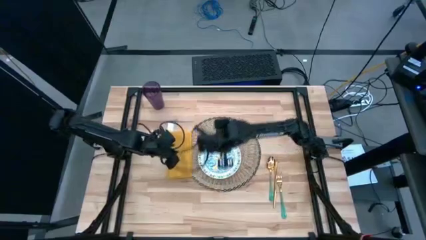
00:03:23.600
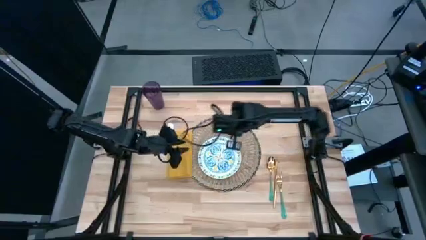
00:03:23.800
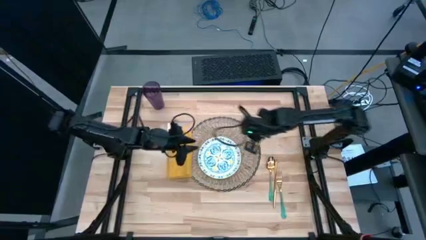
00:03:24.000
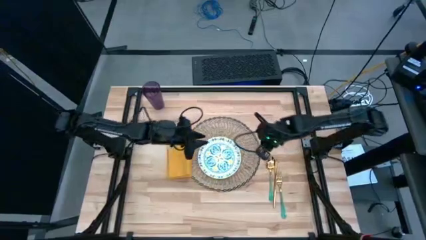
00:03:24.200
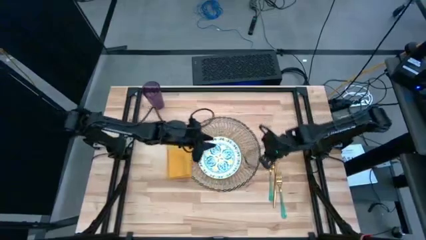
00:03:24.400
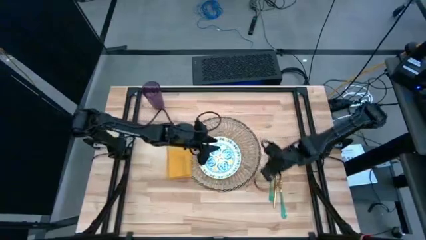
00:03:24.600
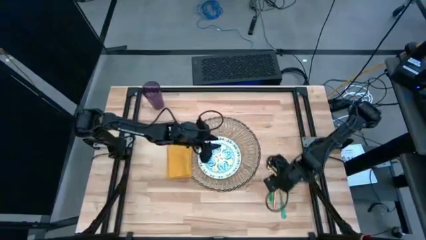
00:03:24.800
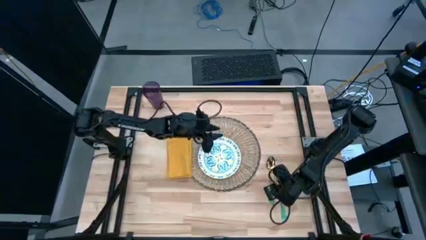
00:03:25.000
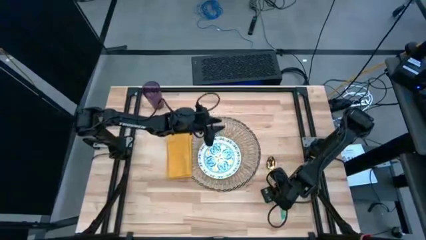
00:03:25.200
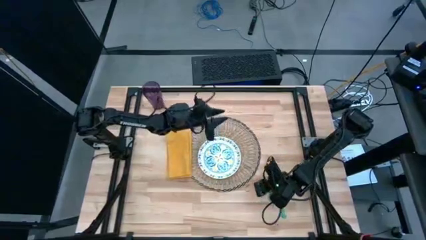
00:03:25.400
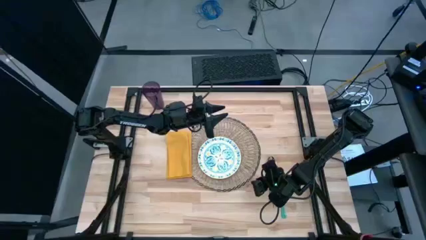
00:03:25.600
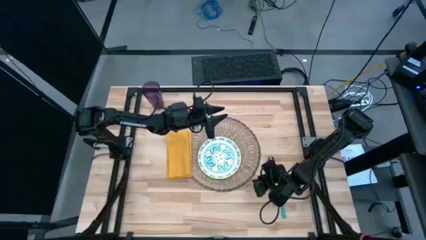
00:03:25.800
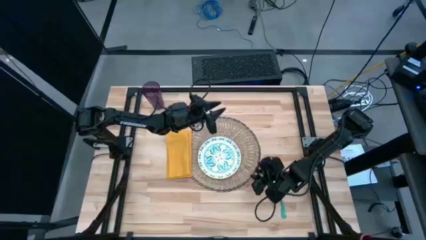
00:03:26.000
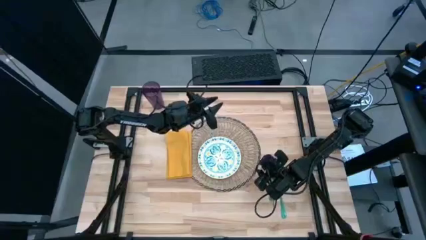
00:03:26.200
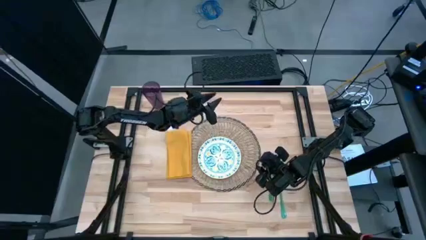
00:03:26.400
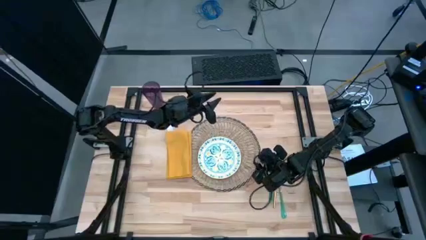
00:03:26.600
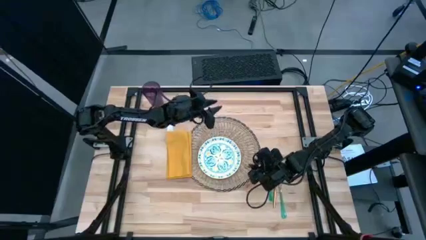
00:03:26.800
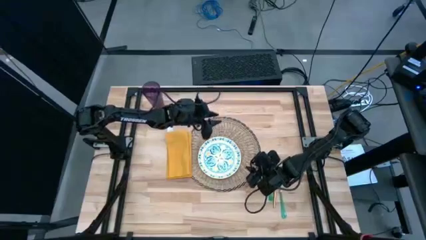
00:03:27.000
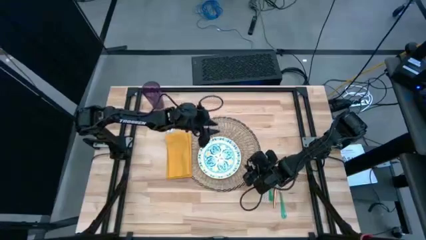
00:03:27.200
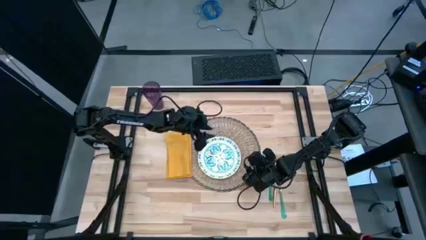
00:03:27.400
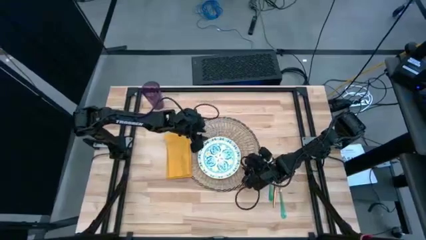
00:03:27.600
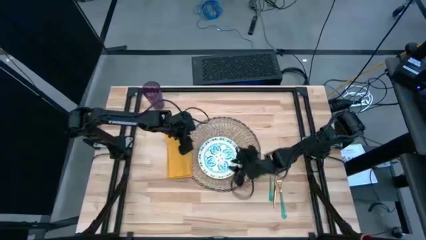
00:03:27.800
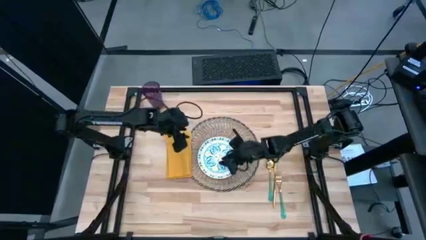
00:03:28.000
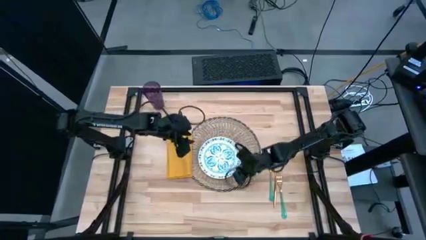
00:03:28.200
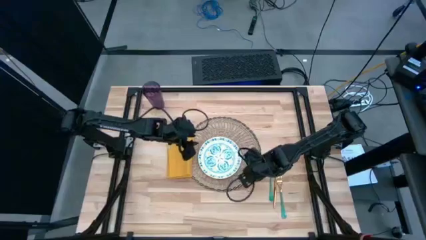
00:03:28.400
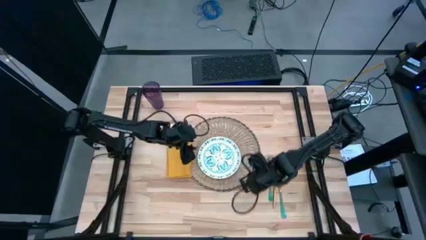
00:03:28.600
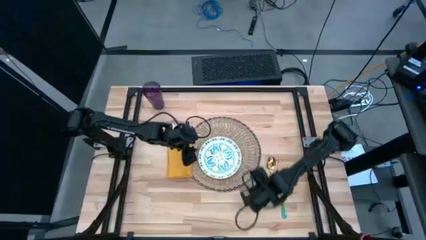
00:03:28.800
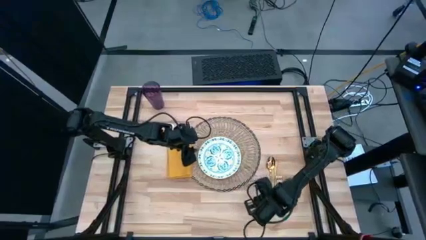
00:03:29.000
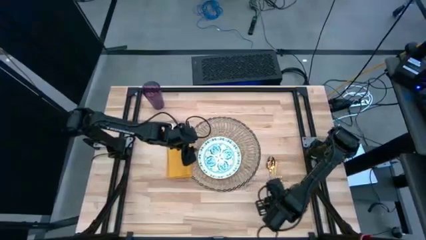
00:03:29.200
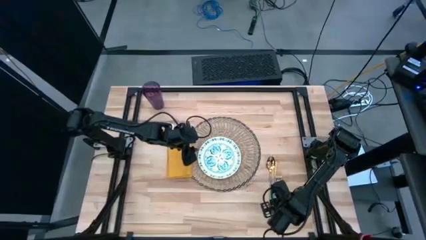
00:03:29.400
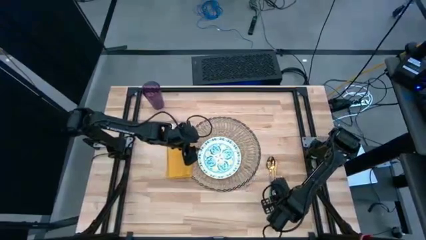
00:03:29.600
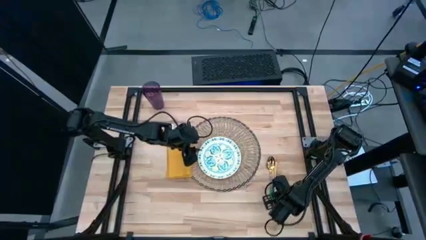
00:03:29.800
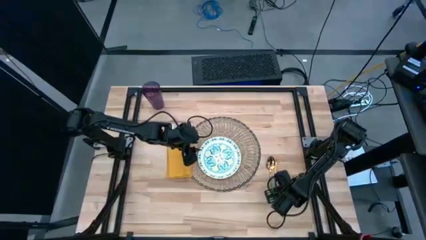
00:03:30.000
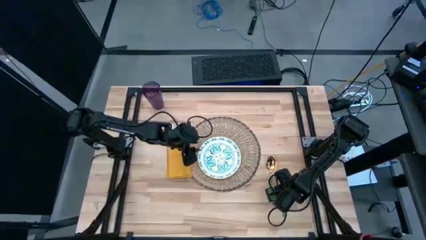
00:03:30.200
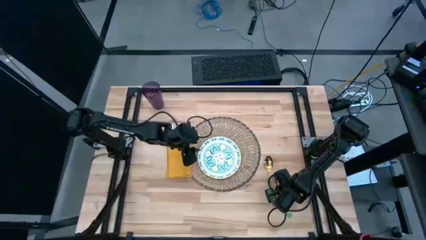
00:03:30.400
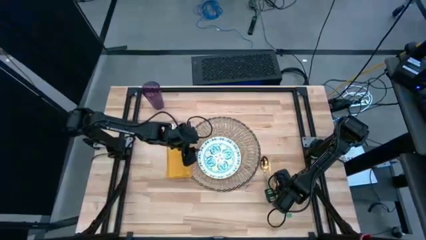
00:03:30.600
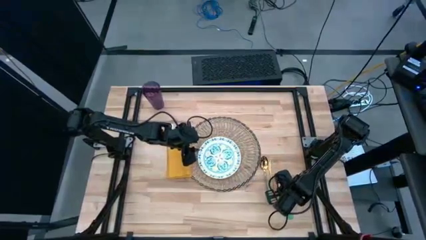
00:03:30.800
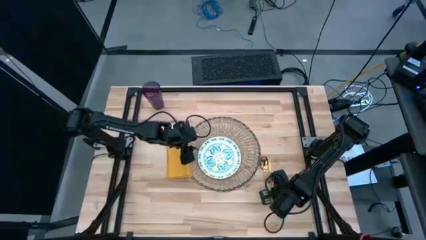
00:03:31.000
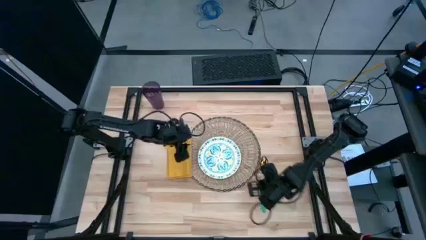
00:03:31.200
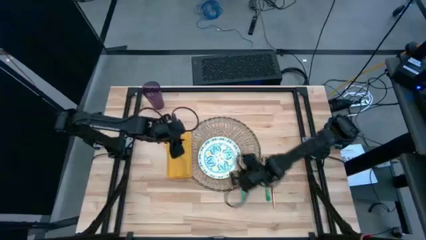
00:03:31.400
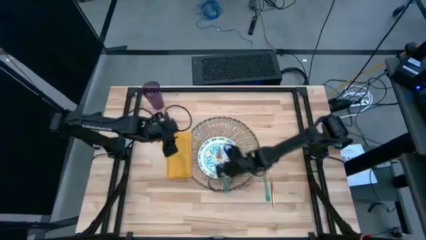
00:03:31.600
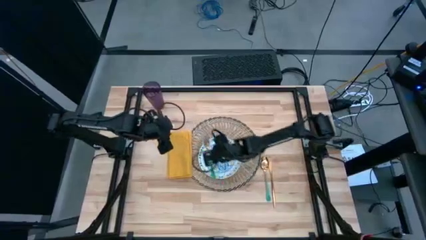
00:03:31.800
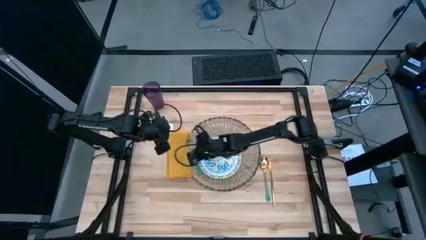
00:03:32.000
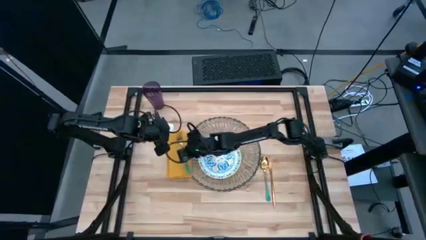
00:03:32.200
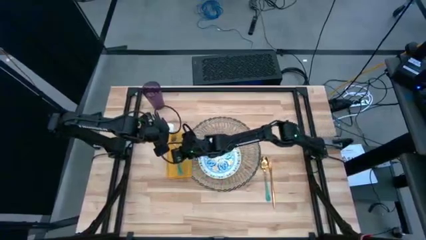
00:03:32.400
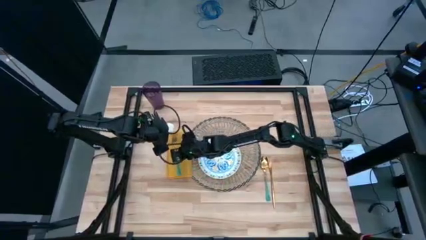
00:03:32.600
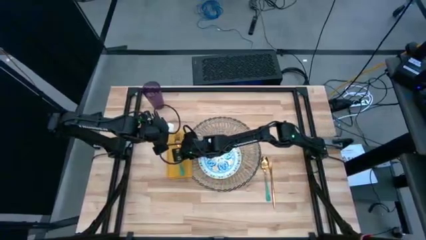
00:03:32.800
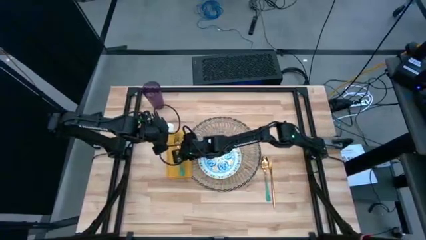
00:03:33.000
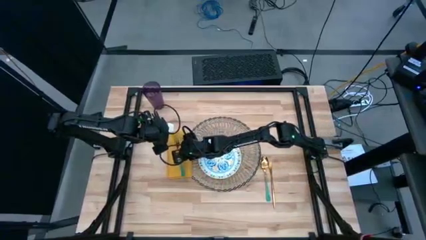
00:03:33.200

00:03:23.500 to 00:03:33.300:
Task: Set table place
Put the green fork on the yellow table napkin

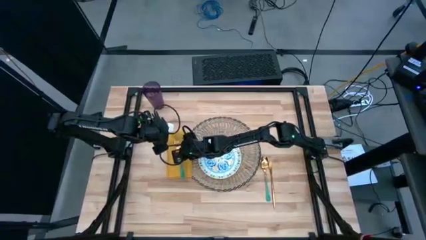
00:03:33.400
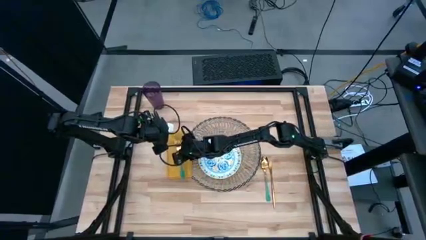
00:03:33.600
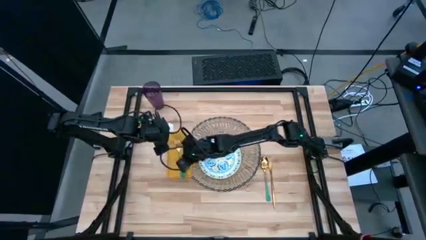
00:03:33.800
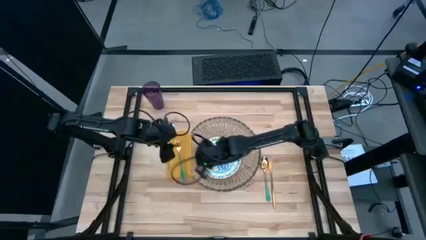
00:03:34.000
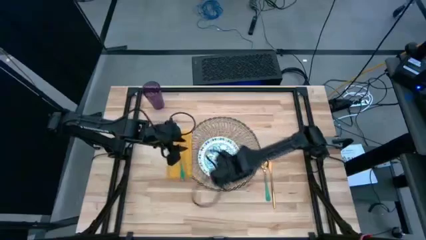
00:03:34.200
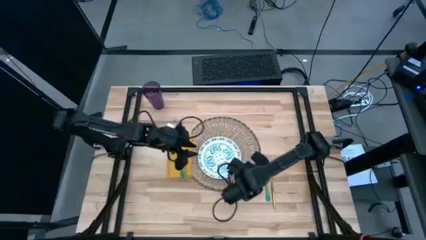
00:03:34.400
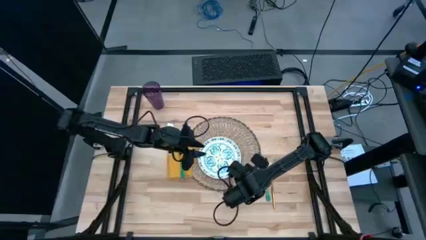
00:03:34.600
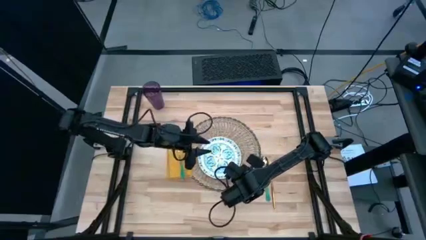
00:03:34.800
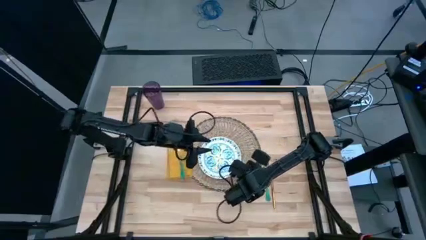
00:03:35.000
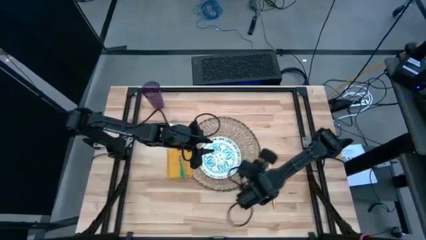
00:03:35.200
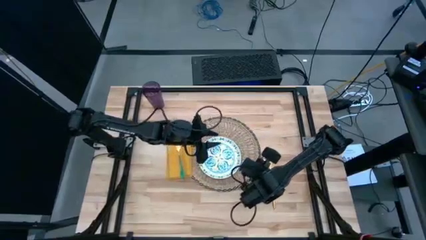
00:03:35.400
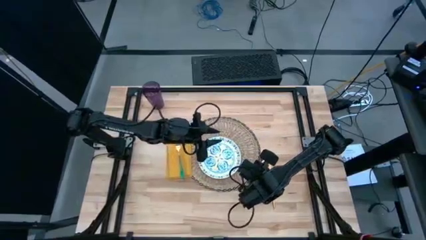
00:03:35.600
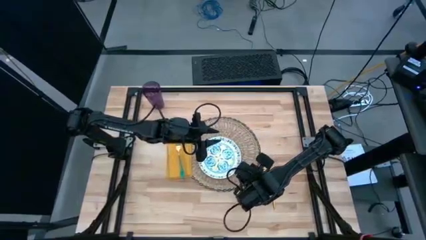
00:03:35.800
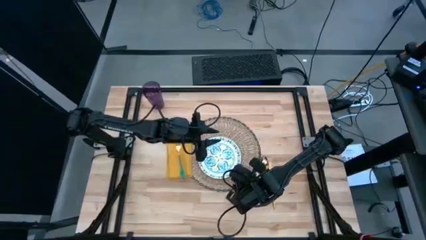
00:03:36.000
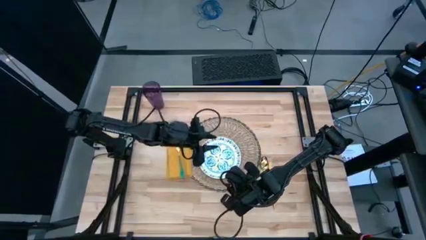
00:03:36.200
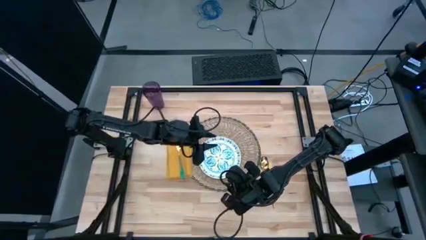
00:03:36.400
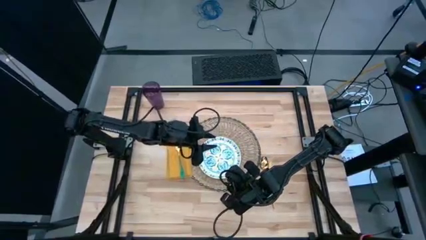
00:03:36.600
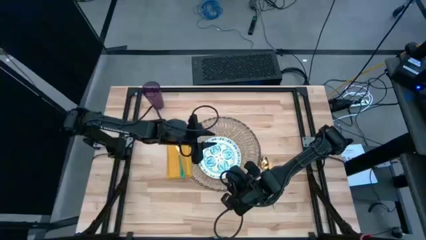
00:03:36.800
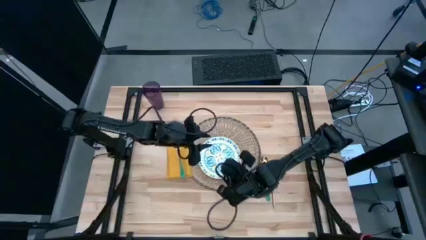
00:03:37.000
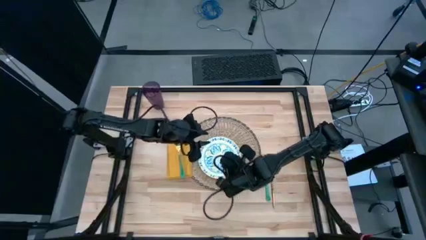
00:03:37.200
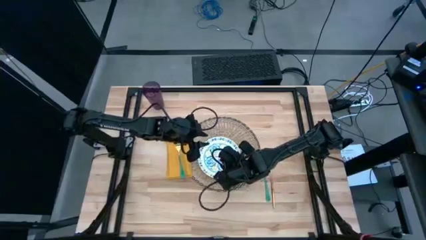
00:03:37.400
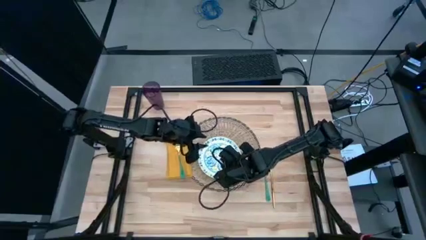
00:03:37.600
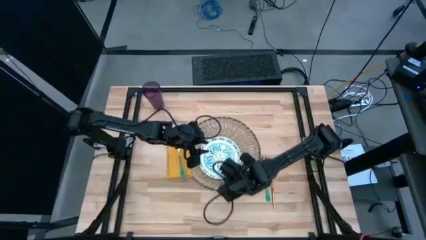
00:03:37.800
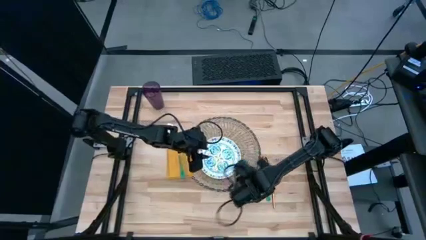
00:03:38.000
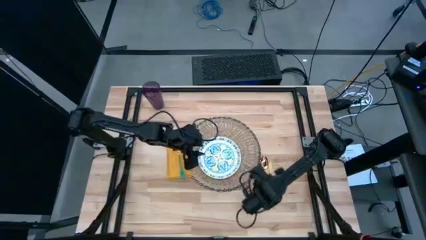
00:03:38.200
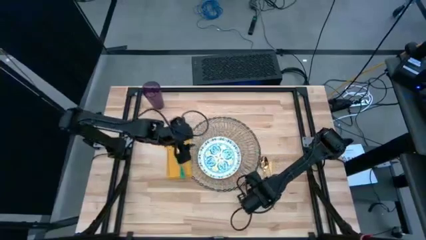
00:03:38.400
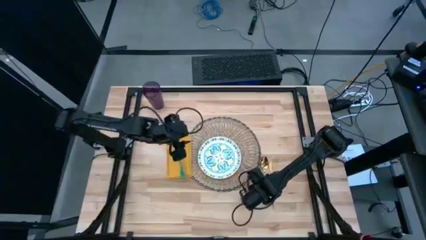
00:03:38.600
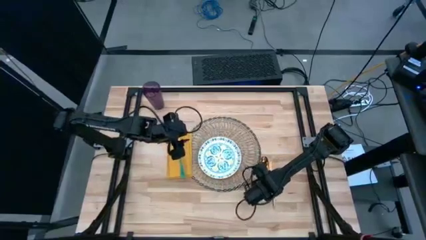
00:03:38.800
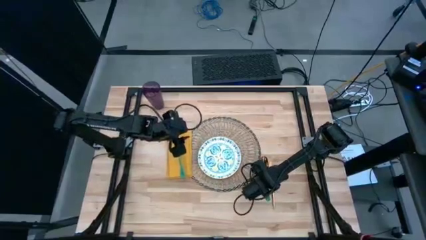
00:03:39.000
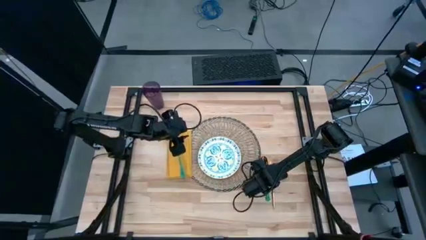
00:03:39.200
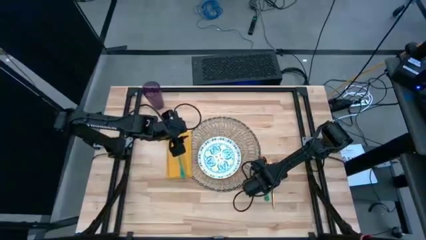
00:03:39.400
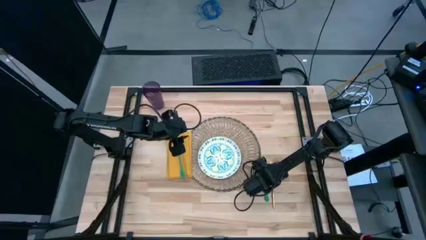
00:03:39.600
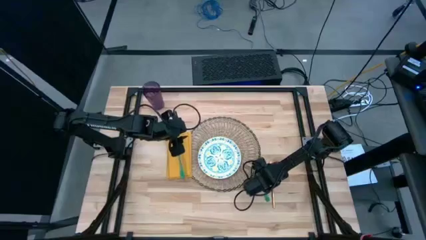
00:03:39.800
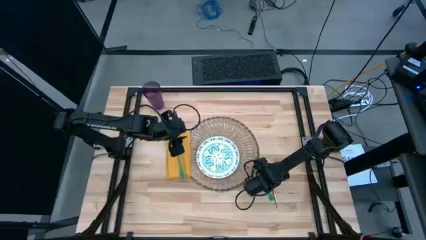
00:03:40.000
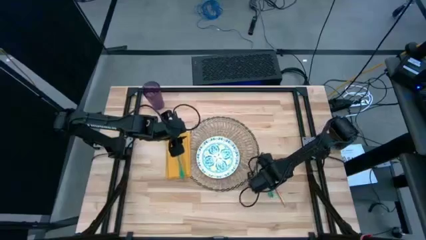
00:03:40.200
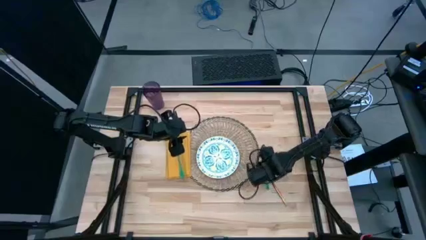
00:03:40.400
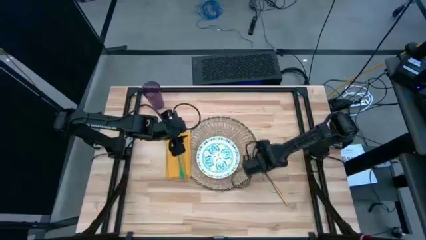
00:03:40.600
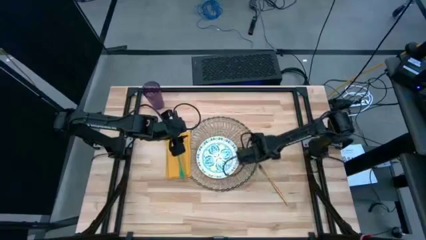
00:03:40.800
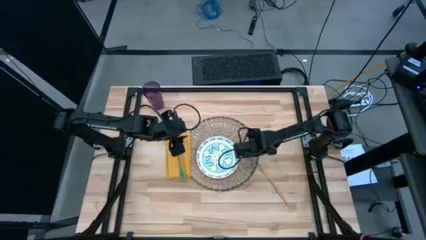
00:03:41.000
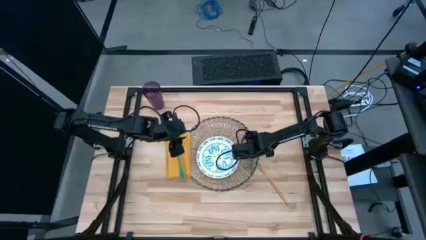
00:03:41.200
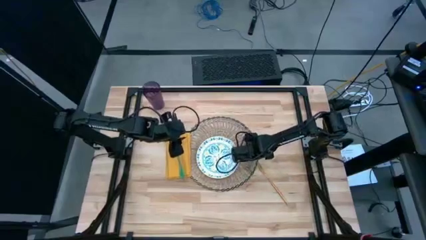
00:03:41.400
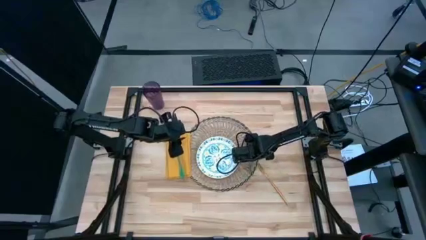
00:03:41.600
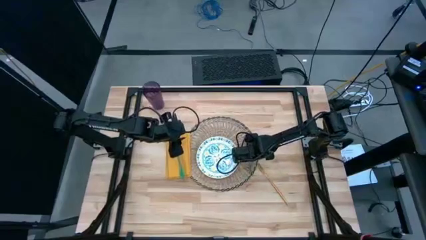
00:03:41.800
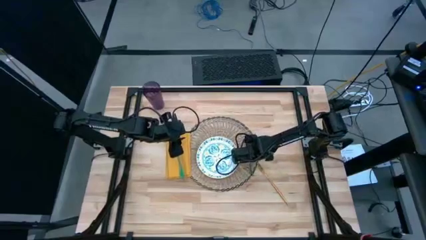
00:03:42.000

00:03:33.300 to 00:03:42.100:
Put the green spoon on the tablemat to the right of the white patterned plate
